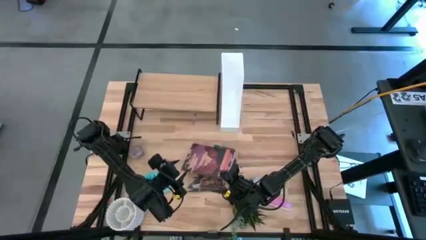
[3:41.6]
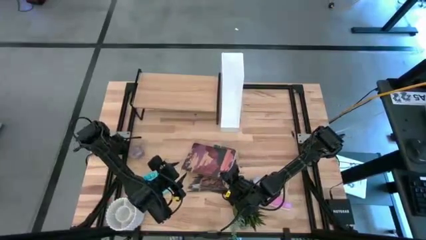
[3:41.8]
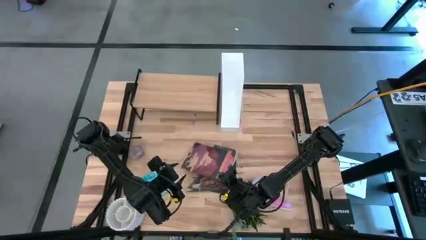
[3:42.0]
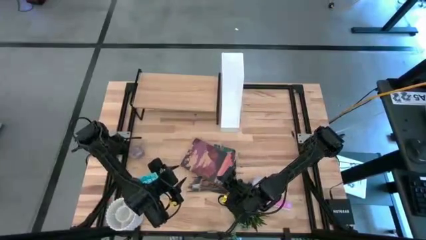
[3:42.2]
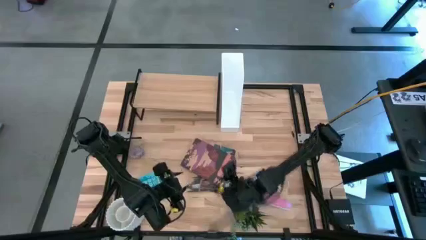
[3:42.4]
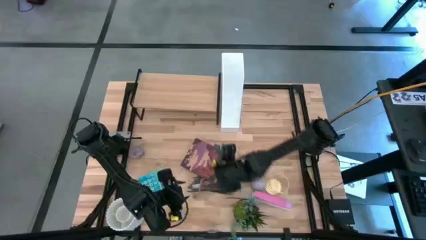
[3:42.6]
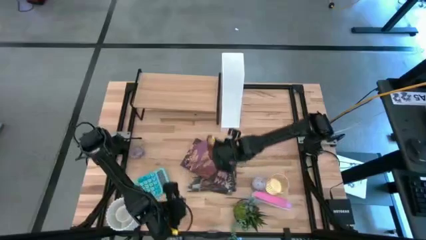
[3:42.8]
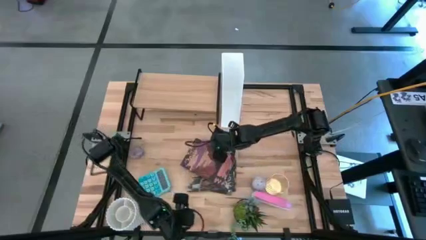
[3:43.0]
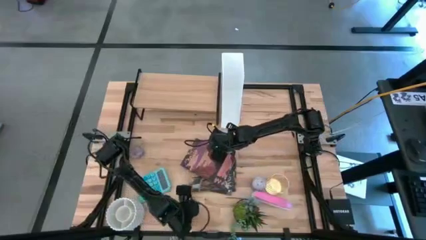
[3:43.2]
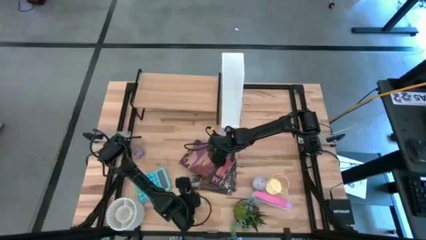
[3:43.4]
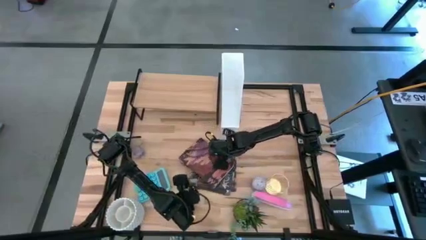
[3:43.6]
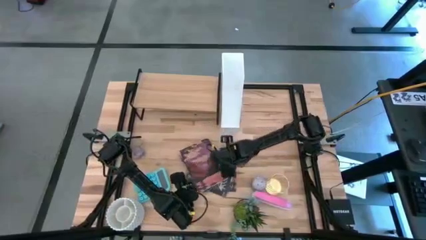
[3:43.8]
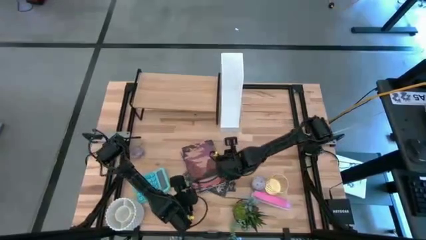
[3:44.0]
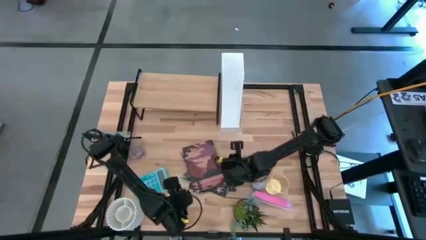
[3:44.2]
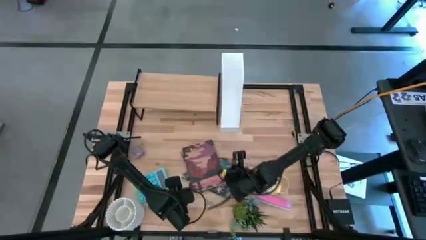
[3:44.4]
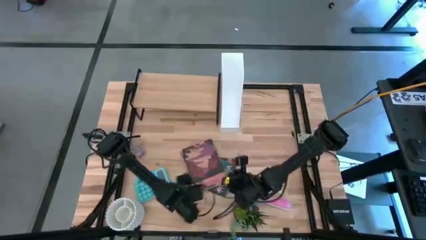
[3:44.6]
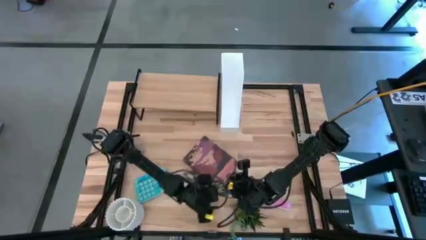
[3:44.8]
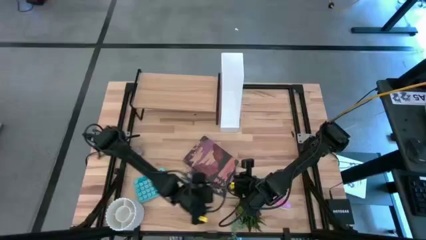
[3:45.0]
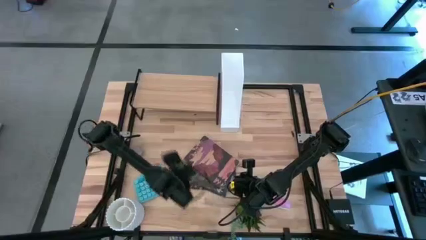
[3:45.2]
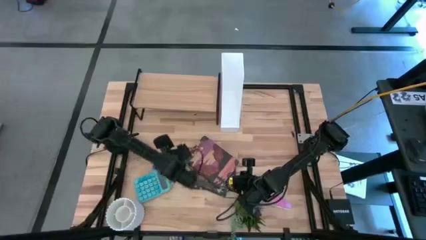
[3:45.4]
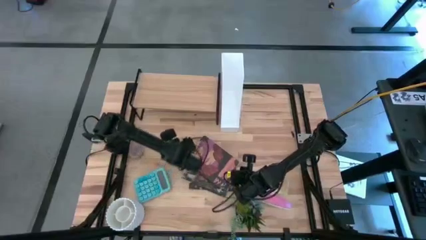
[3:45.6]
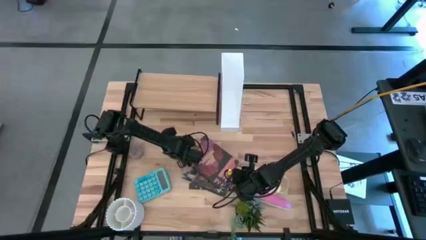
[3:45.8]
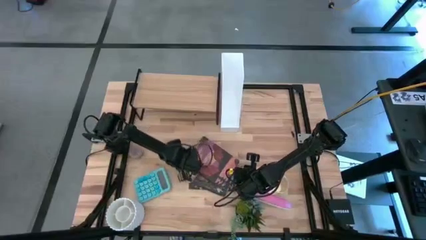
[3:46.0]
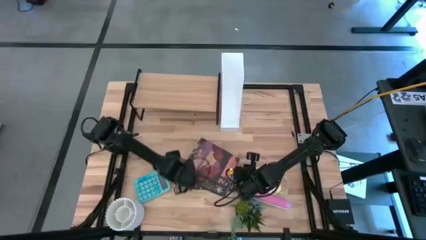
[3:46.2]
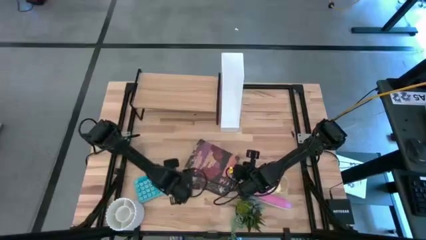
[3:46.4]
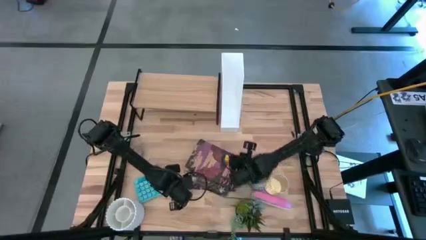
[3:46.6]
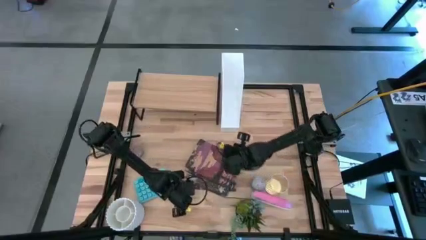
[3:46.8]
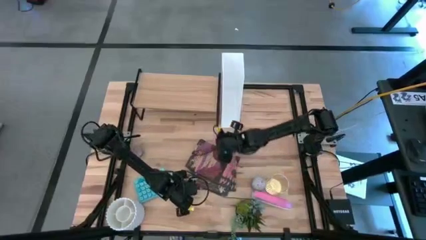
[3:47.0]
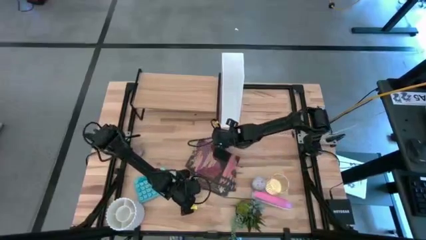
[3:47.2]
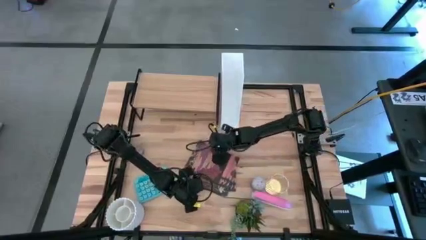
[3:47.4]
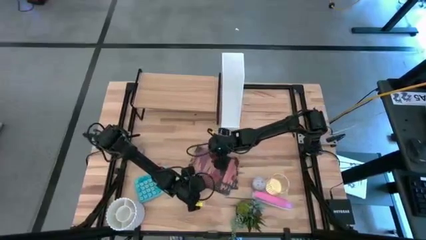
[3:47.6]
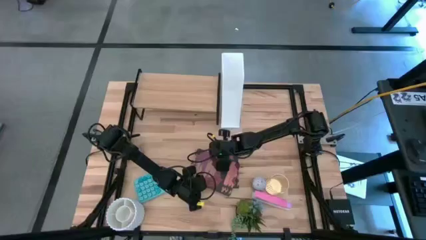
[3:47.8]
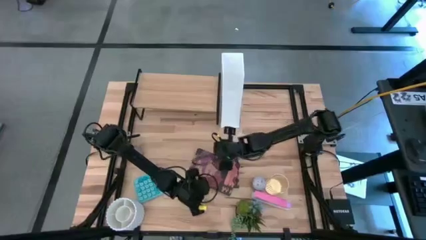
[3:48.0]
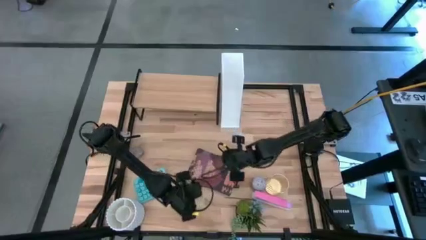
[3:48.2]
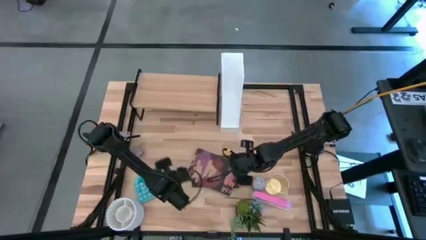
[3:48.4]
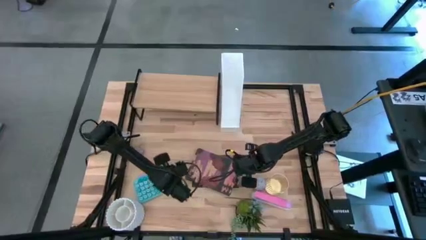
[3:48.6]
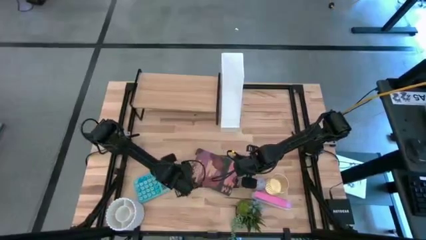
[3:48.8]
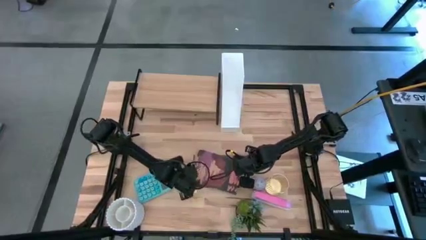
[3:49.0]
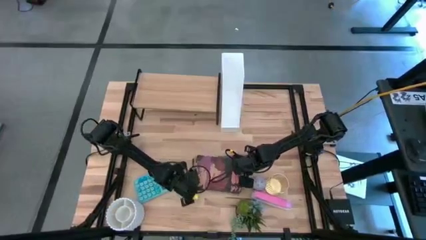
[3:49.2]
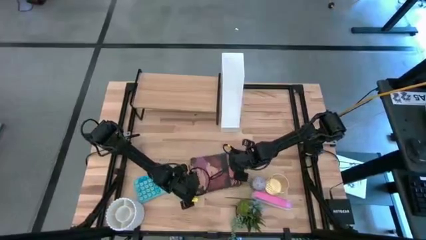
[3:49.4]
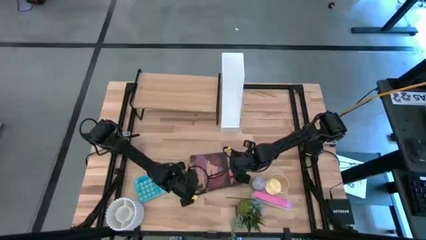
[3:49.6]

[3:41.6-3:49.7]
Task: Stock shelves
Adjust the books

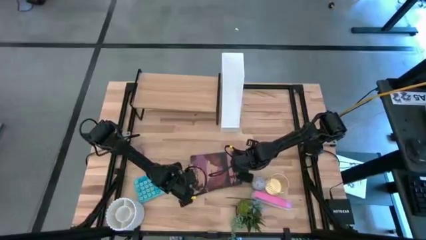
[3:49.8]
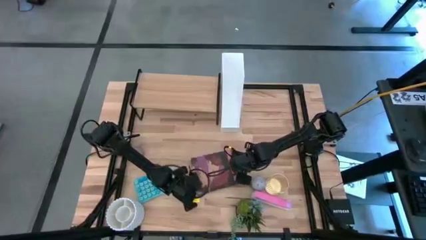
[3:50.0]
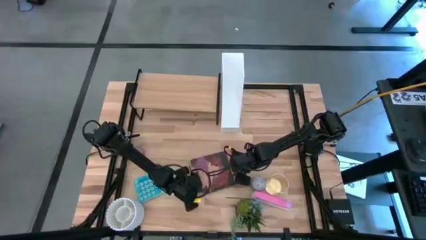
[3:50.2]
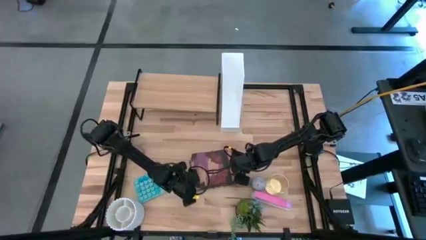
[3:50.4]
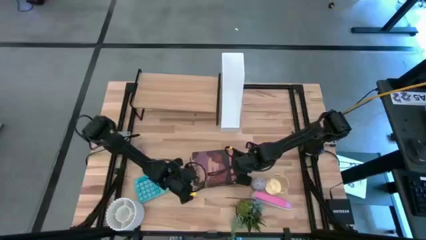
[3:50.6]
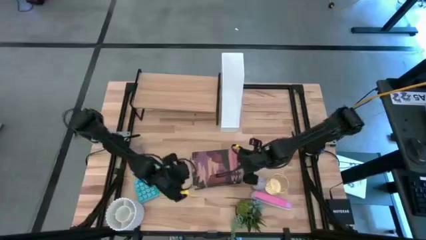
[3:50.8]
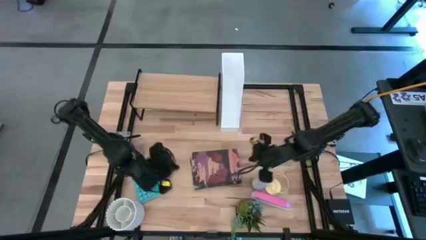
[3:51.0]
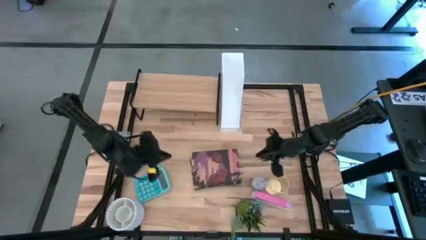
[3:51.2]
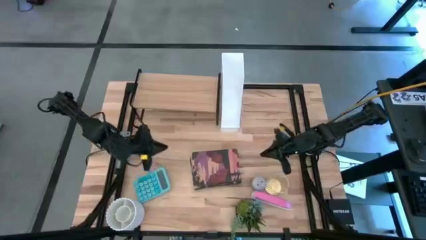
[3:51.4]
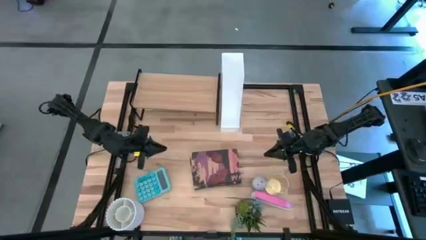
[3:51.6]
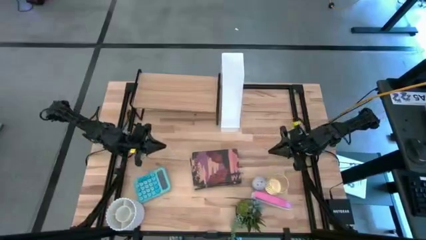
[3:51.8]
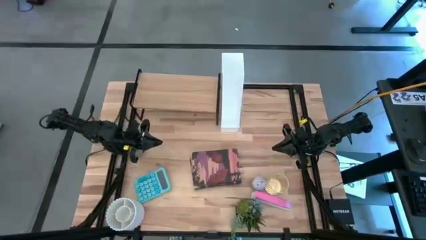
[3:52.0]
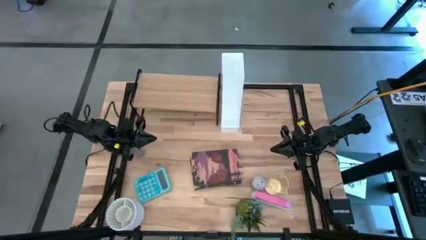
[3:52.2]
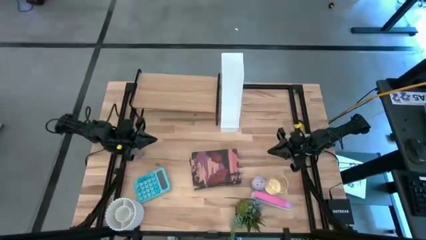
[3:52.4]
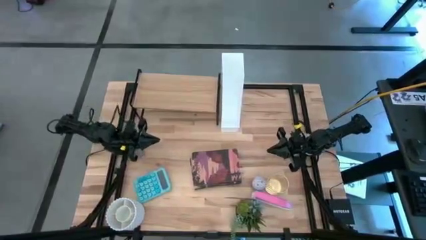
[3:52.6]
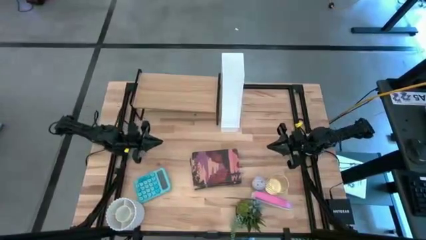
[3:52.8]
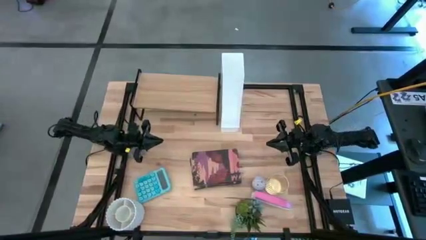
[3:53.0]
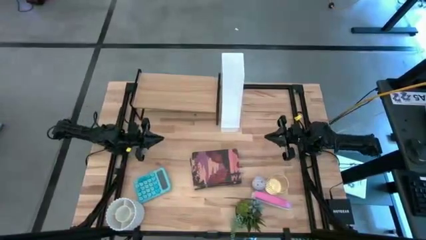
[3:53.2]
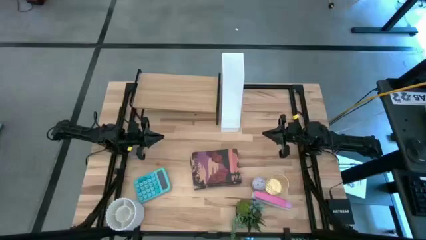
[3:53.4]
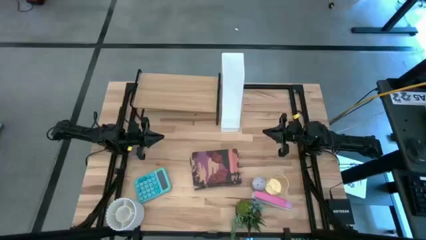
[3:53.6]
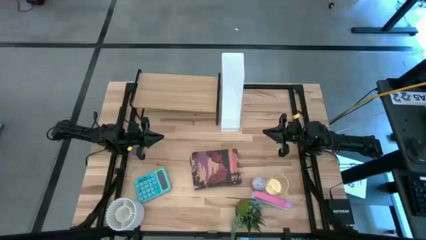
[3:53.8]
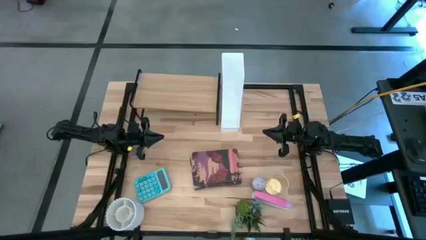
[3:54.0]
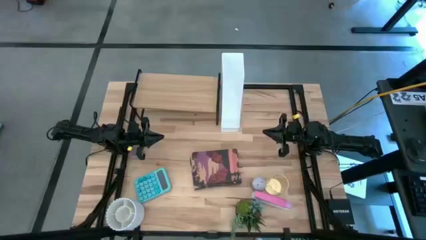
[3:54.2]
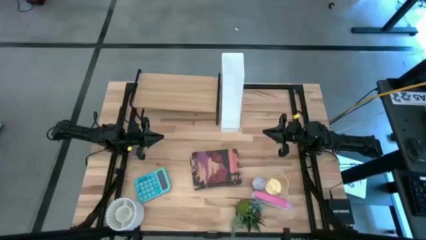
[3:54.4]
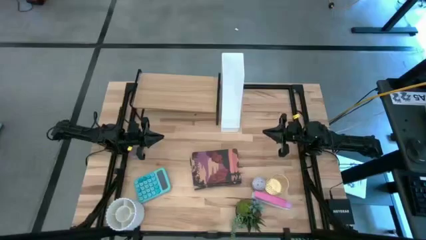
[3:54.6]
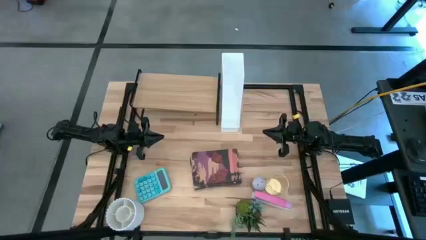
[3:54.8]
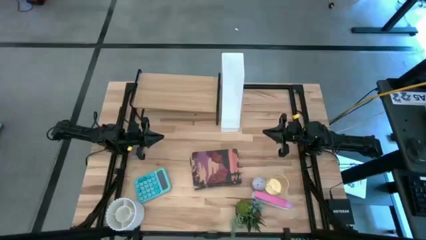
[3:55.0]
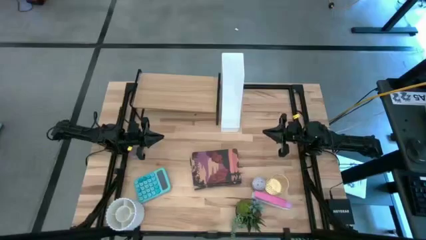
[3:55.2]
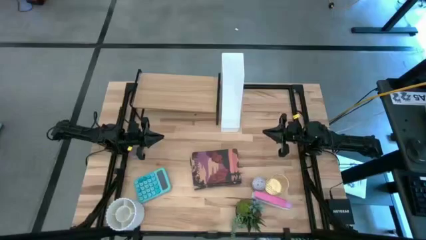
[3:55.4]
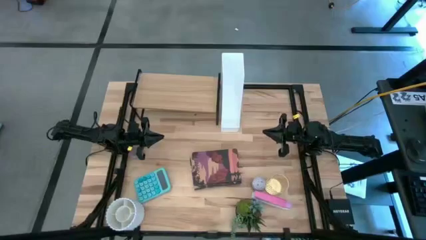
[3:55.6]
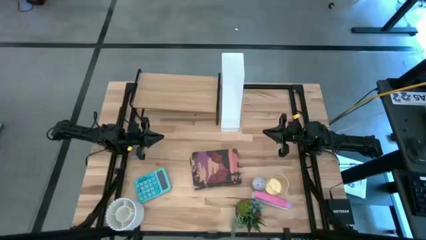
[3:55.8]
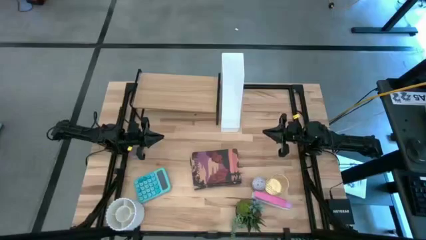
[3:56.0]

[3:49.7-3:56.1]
Return to Home Position

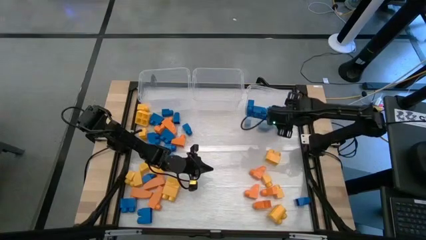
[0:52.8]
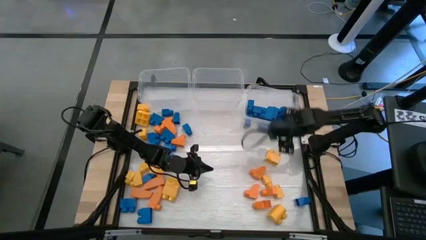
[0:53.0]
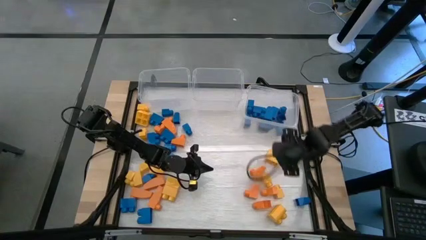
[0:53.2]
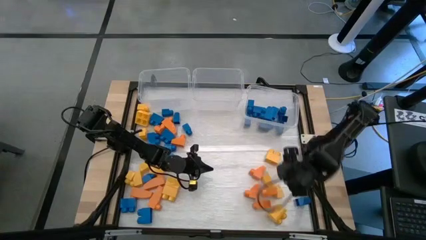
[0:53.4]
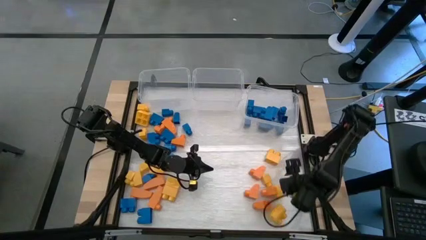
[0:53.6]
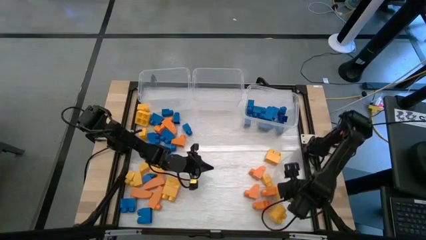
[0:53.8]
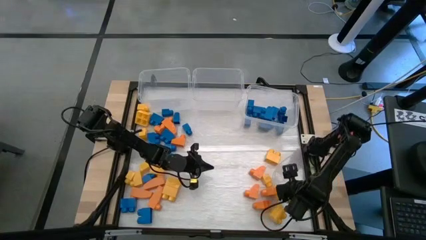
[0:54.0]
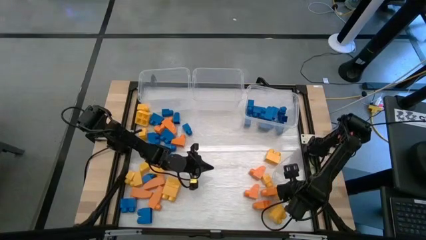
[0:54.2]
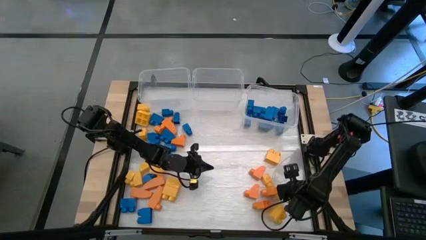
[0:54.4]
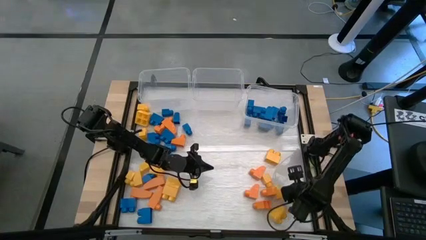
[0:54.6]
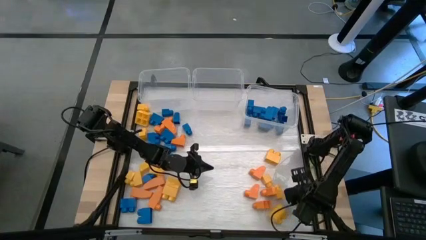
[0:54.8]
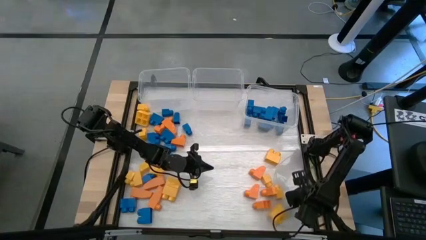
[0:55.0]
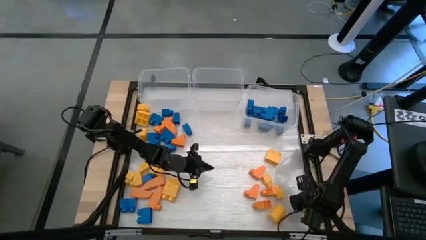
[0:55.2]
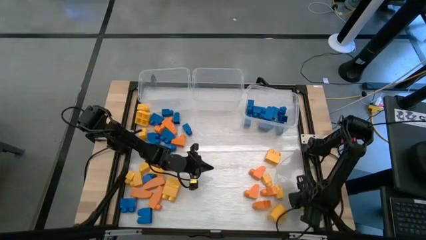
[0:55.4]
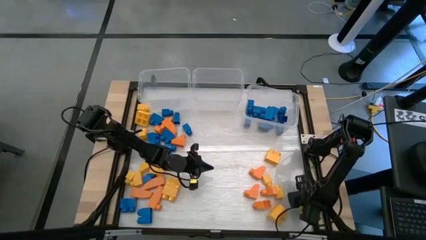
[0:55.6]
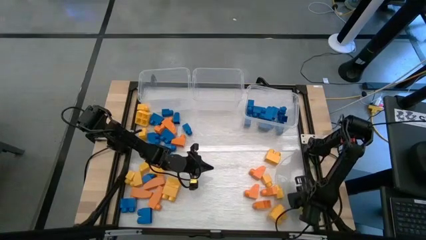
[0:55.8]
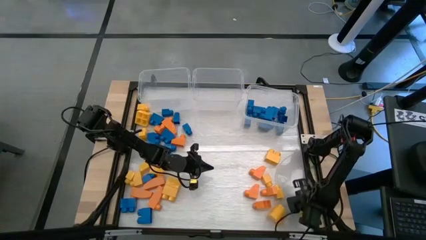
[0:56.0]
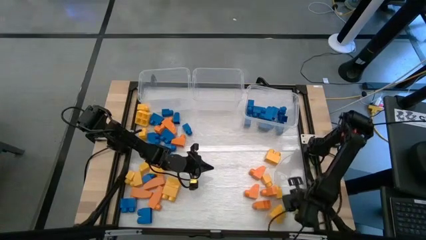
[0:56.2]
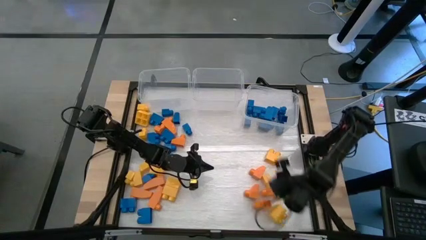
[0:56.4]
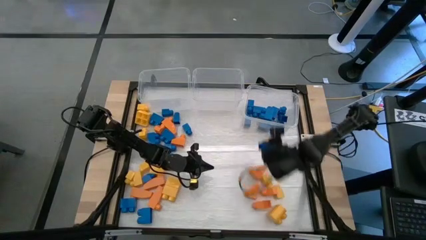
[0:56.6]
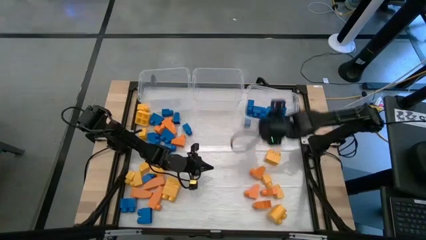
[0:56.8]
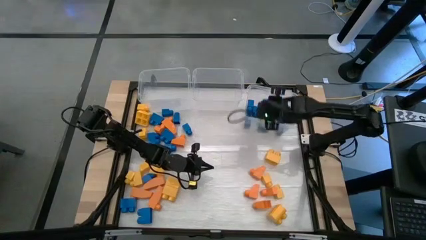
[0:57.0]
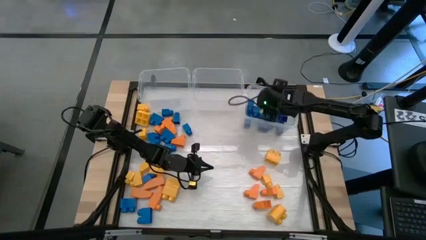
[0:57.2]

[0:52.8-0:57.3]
Task: Sort blocks
Put the blue game piece into the right transparent bin
